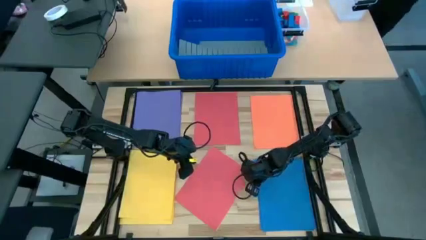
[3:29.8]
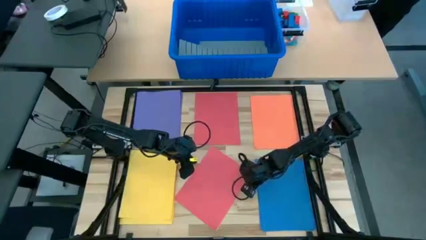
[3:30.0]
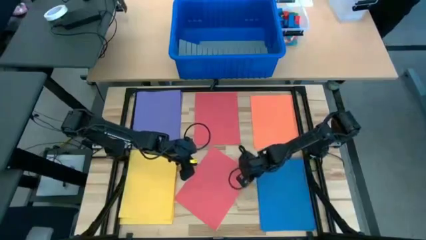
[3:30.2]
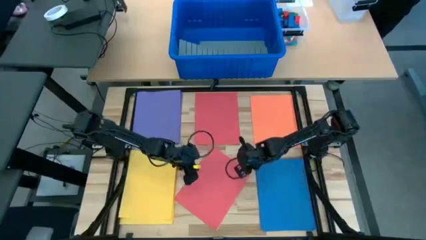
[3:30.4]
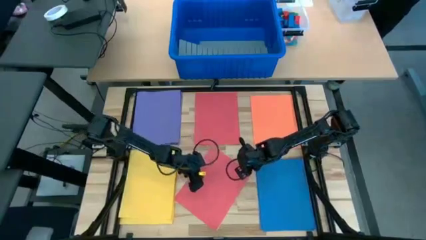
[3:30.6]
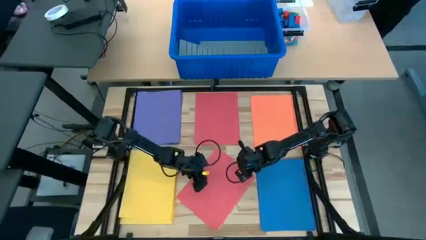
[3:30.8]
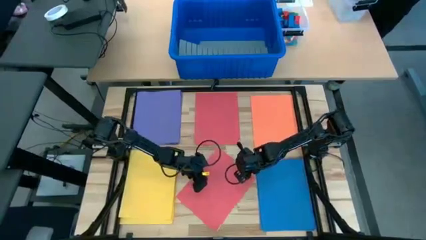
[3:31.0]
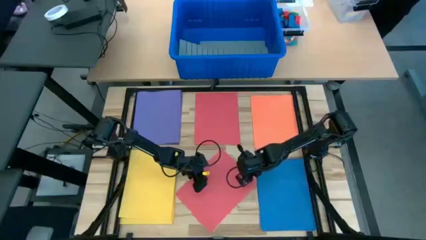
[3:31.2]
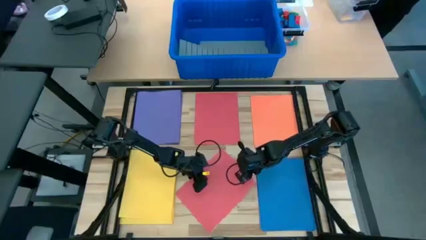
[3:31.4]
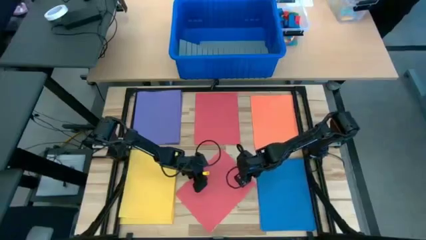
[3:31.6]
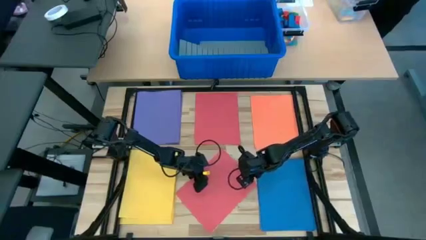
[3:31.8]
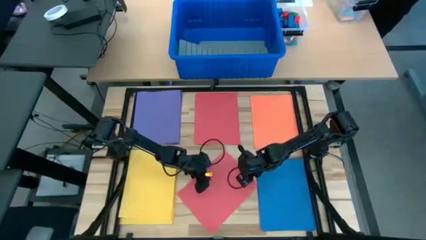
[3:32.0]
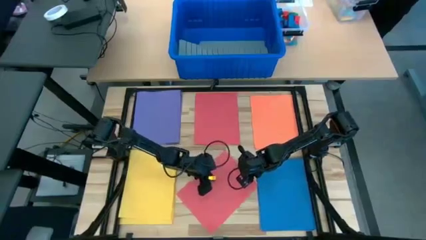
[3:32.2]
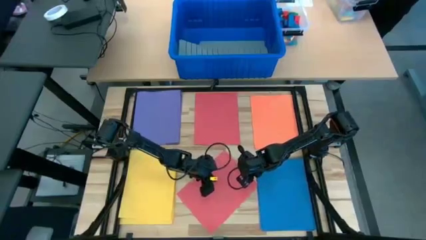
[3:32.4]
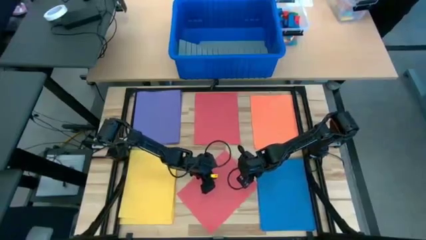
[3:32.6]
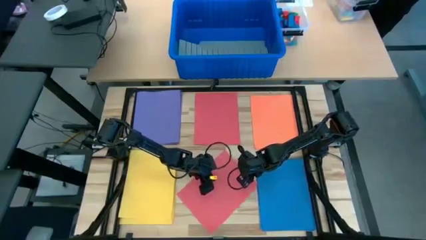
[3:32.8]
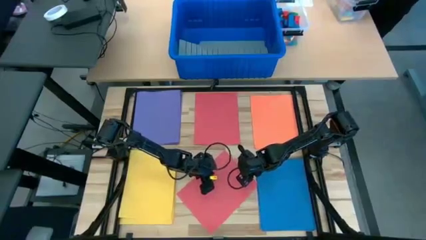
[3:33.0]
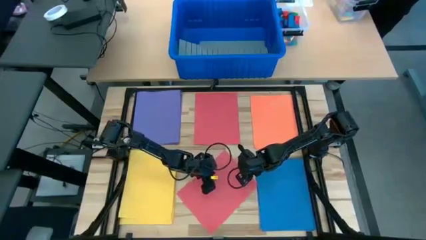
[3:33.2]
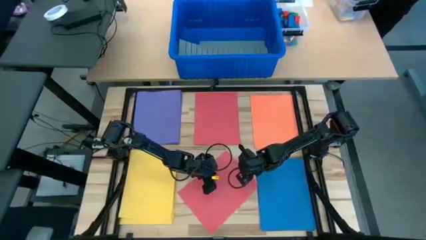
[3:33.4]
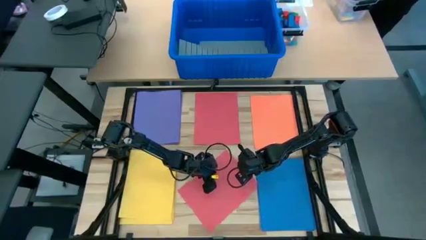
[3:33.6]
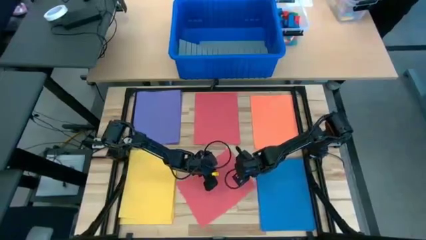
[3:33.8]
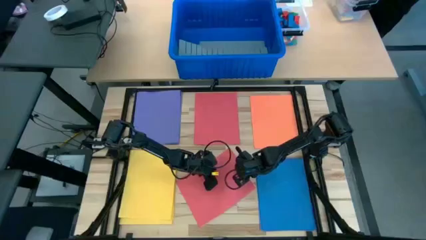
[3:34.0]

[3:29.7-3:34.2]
Task: Organize paper
Stack the pink colored paper on top of the other pink colored paper

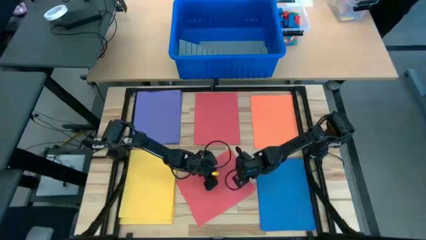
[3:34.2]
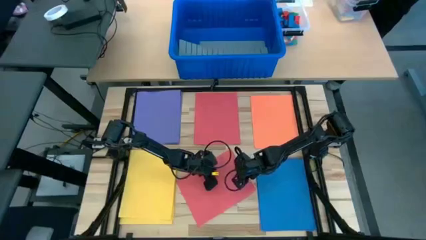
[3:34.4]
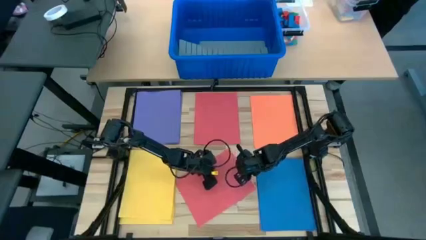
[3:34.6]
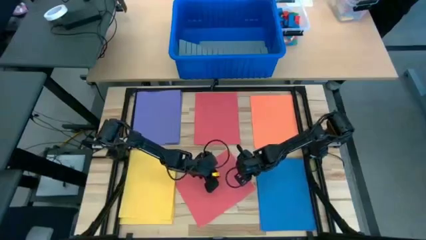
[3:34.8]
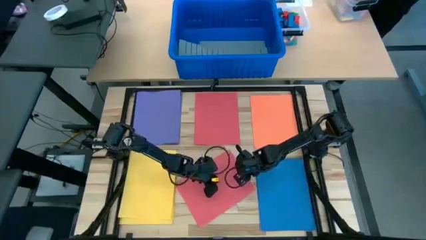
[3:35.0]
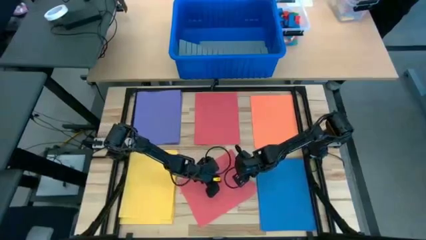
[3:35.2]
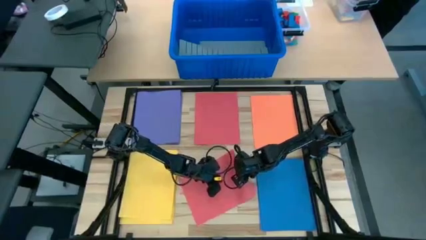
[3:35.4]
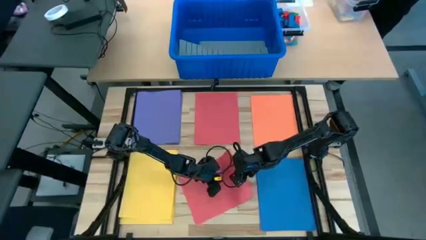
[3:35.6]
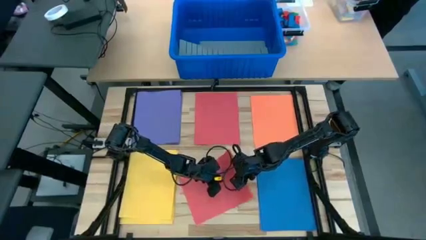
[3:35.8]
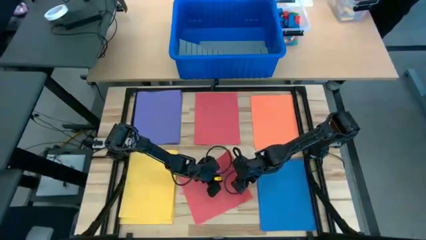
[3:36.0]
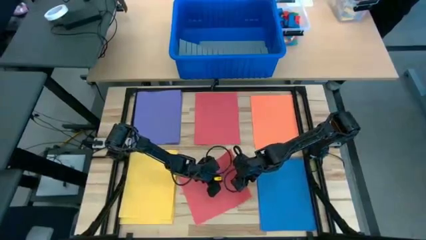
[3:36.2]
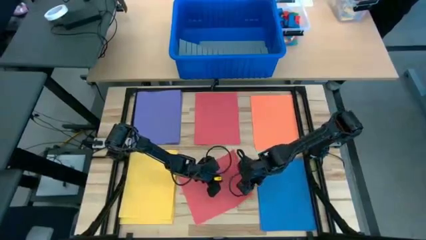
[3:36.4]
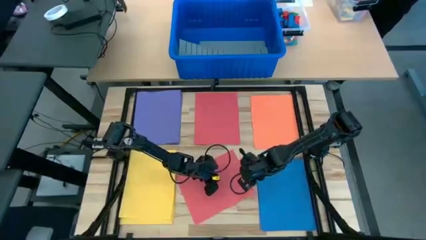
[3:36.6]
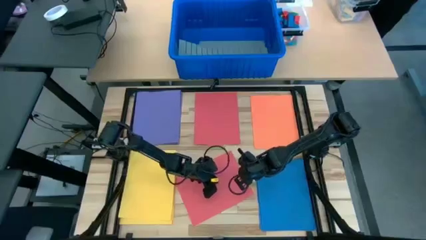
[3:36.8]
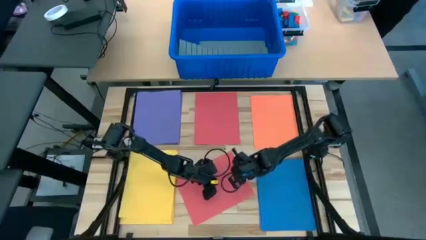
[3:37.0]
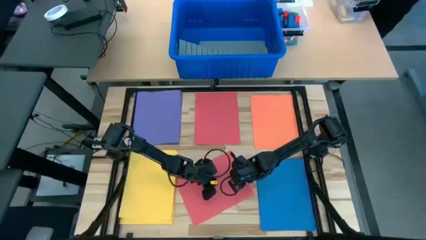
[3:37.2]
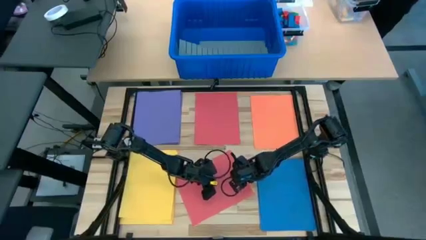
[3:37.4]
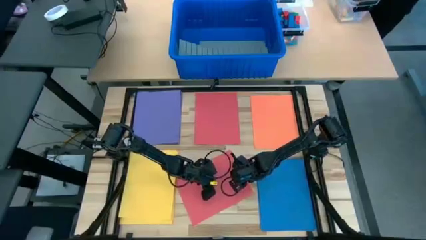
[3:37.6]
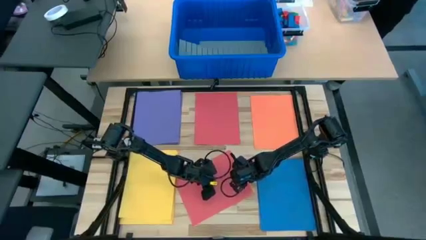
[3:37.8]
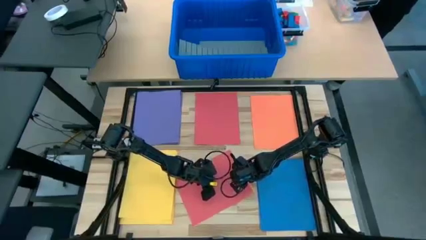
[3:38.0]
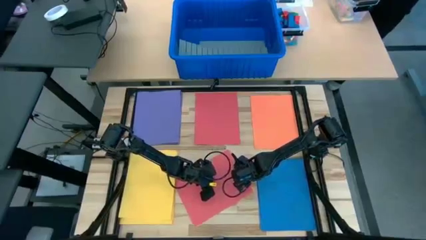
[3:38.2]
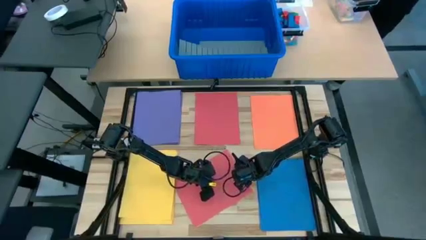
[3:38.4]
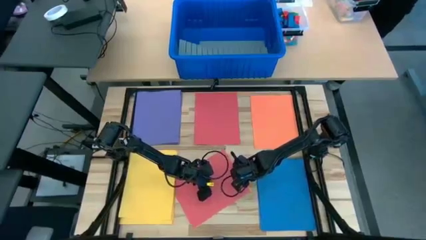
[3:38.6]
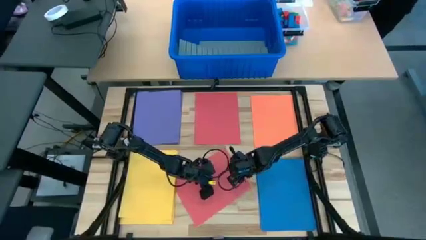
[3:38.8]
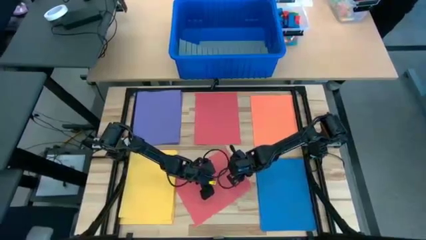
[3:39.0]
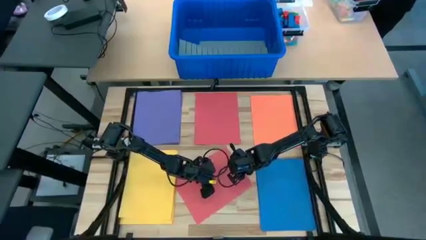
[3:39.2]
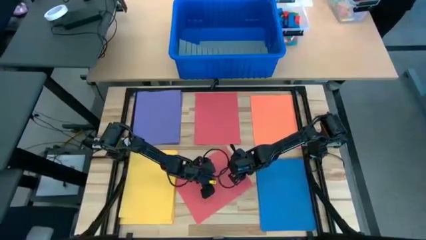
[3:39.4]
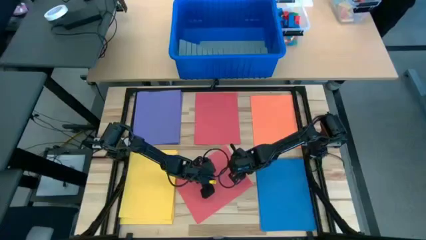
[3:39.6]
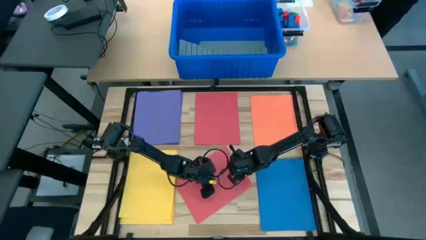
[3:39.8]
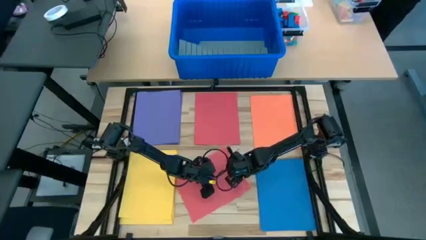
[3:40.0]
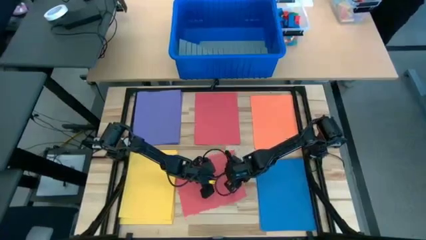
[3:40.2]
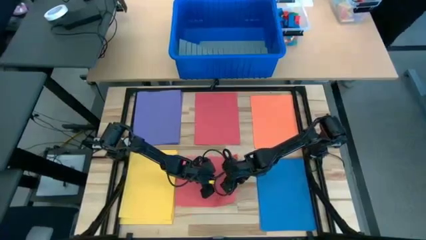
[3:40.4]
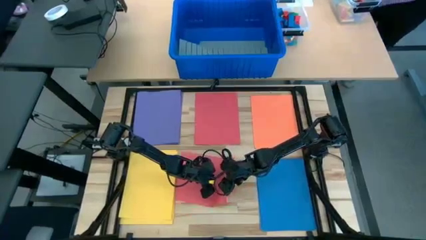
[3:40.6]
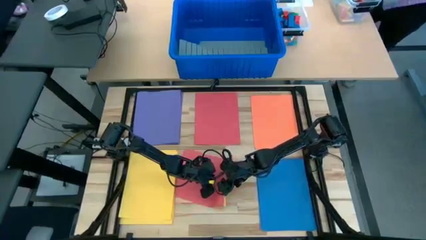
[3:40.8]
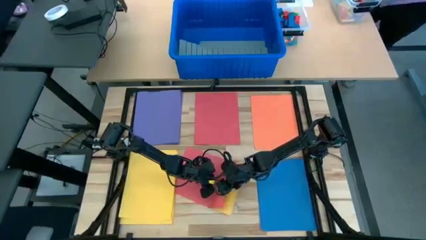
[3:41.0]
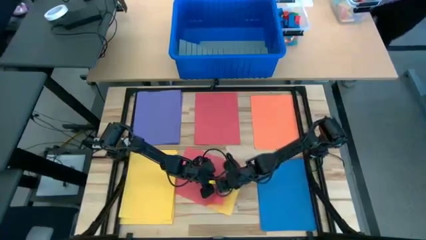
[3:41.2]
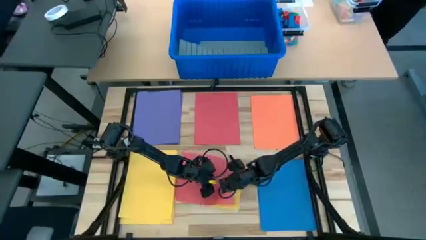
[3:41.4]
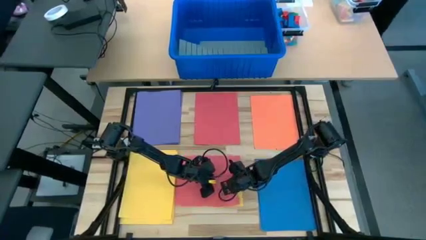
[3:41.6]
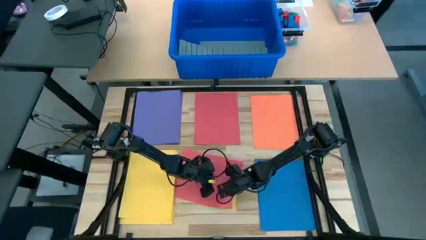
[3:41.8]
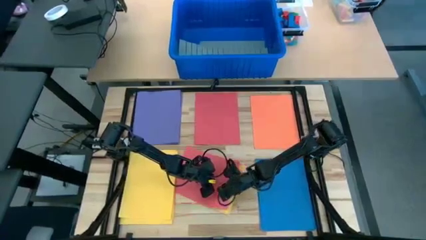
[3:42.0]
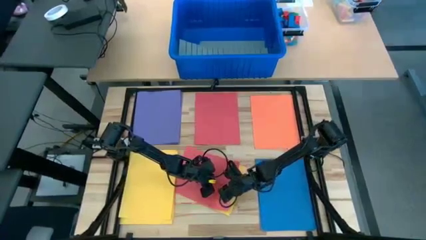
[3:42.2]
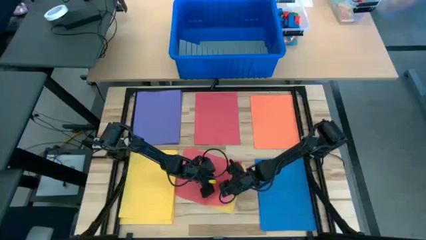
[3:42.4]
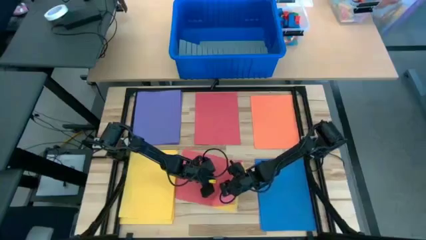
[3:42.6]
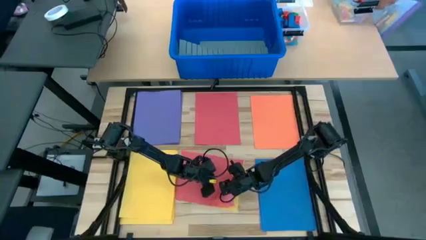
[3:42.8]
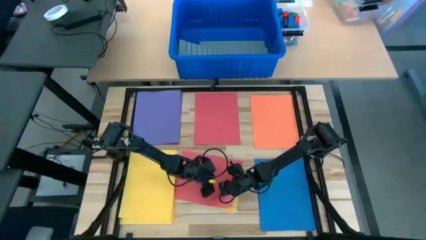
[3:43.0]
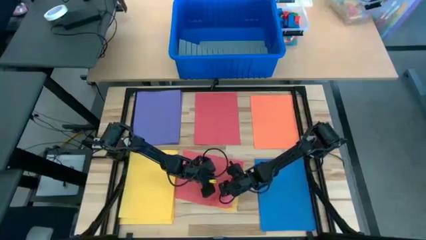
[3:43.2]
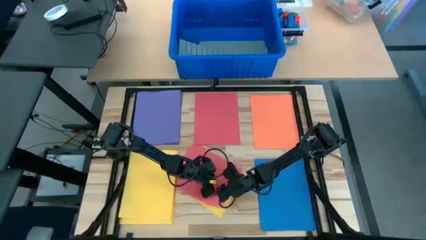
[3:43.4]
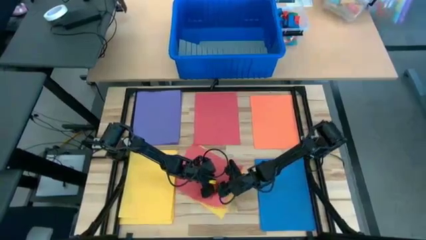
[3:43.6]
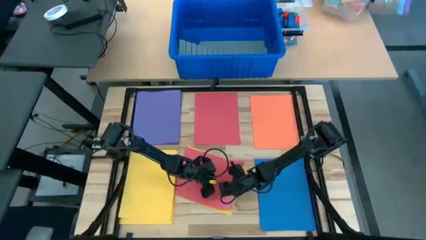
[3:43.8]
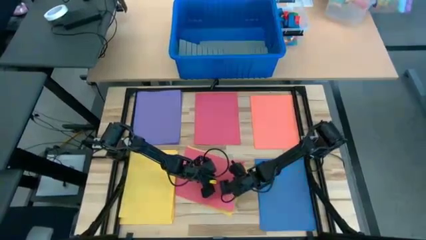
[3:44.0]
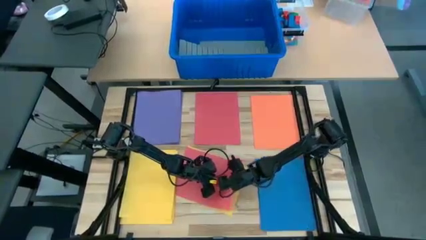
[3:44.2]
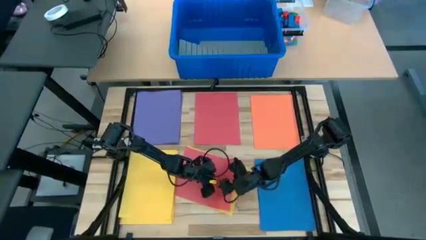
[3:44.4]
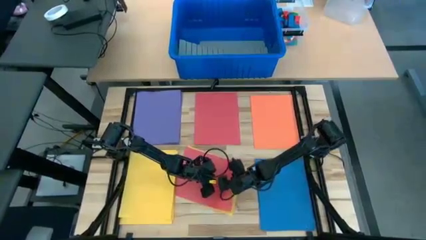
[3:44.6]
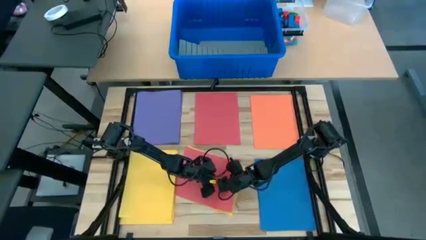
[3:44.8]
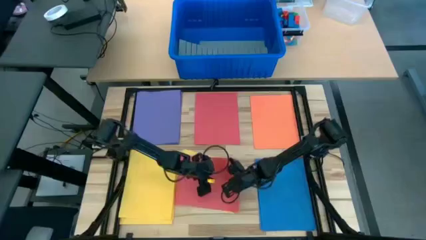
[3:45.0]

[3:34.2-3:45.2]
Stack the pink colored paper on top of the other pink colored paper

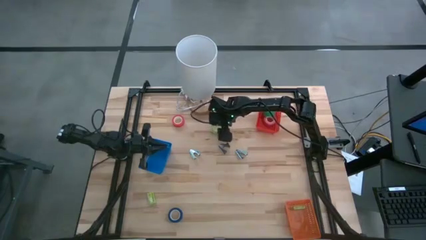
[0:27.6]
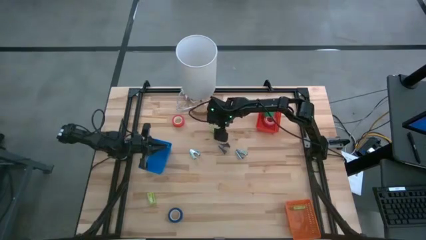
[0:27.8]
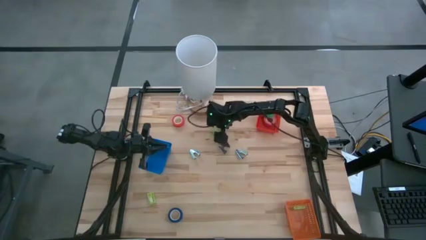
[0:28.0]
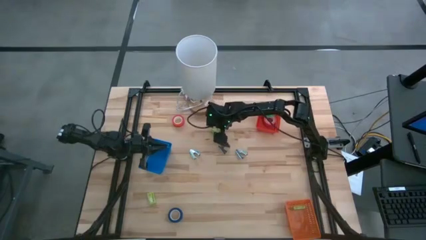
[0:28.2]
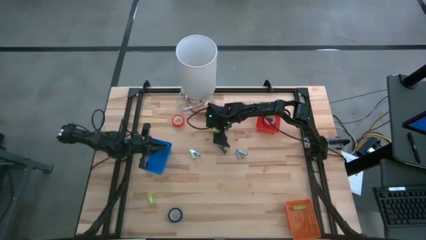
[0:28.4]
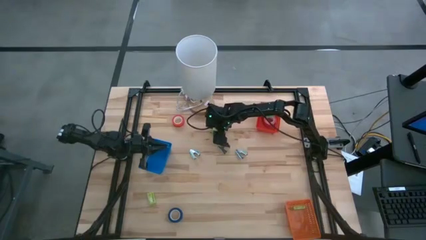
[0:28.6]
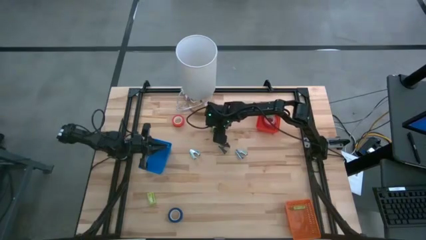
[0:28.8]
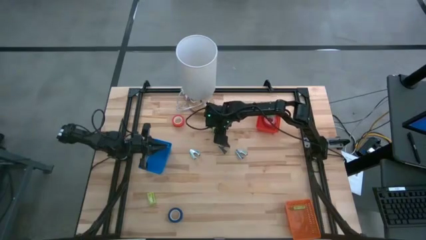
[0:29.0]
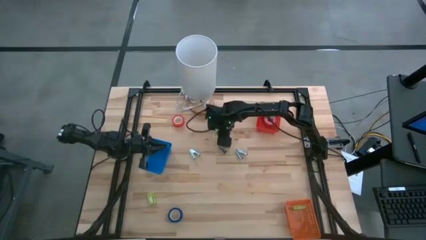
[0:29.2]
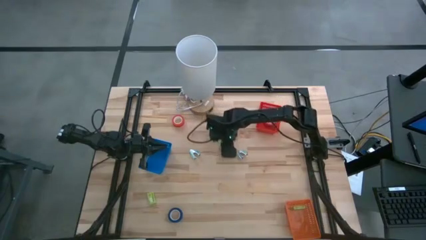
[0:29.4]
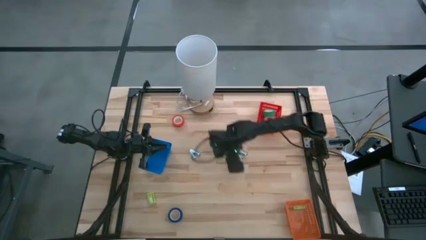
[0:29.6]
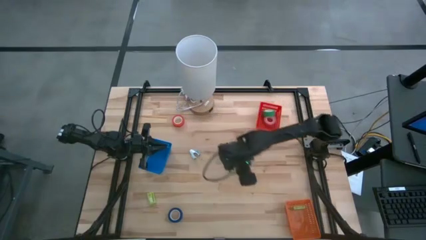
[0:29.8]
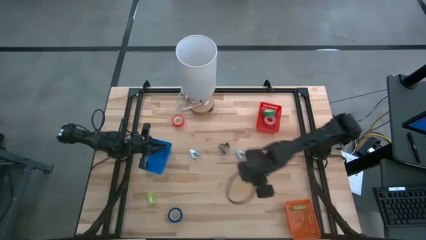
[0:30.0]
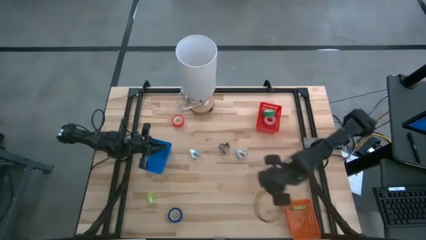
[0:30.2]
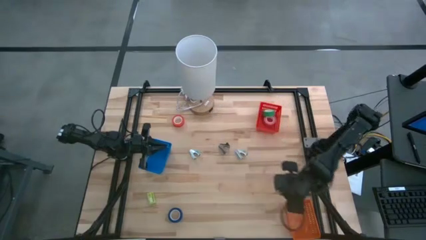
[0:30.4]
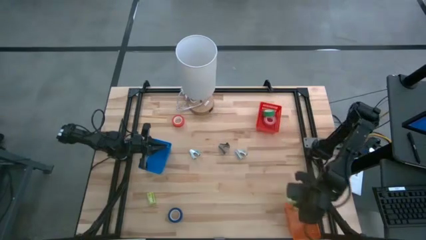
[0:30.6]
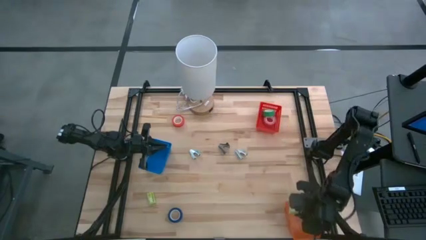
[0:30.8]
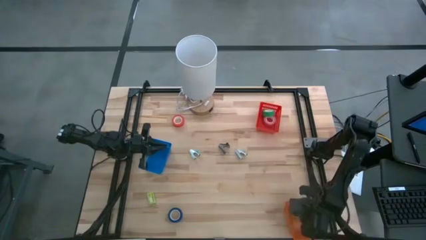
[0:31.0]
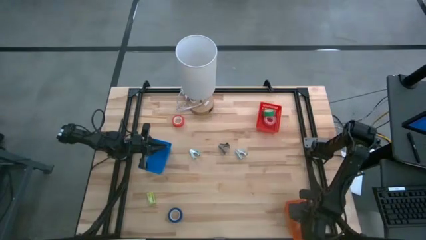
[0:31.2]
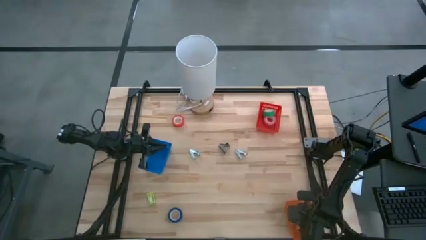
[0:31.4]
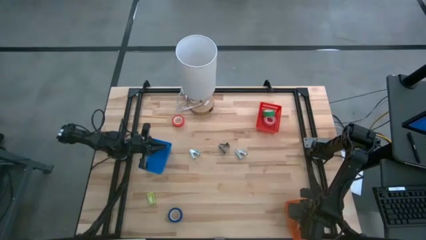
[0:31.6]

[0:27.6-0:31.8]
Task: Pick and place Stapler, Stapler remover, tape
Put the top staples box into the orange bin
